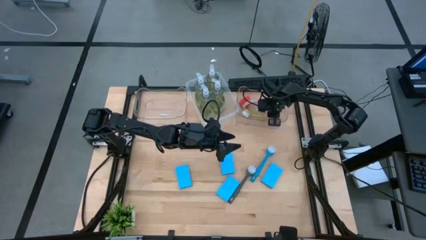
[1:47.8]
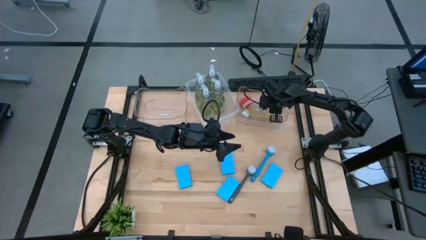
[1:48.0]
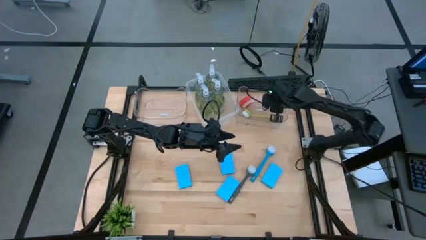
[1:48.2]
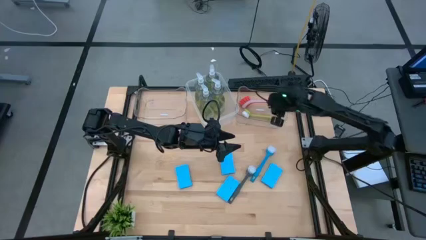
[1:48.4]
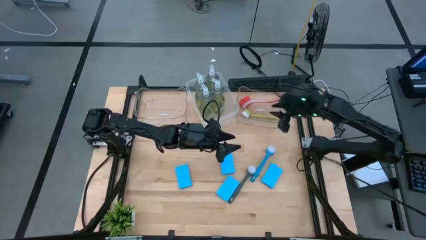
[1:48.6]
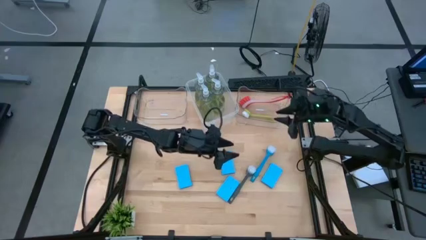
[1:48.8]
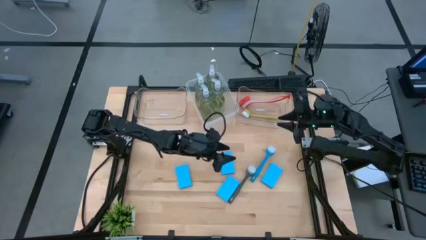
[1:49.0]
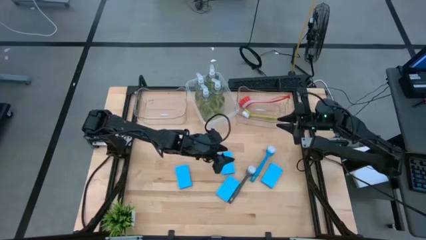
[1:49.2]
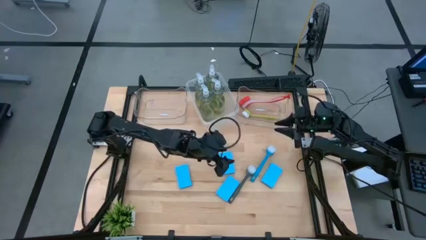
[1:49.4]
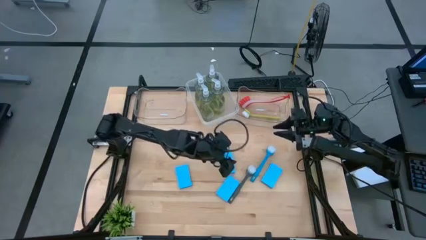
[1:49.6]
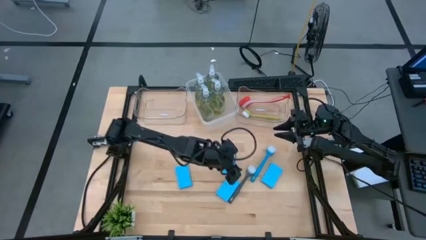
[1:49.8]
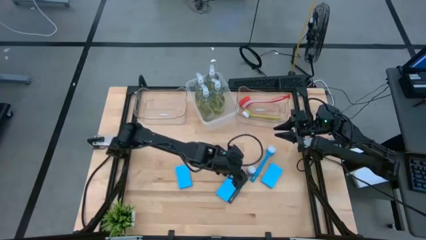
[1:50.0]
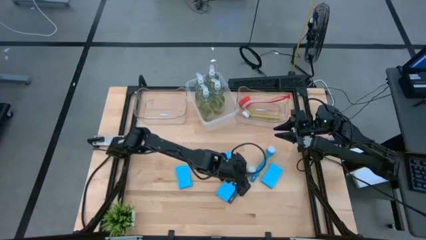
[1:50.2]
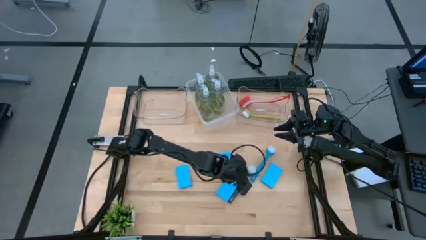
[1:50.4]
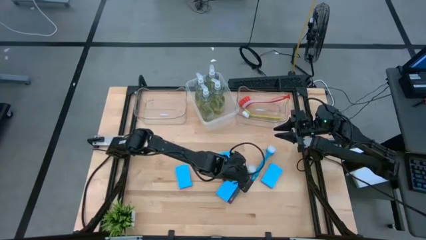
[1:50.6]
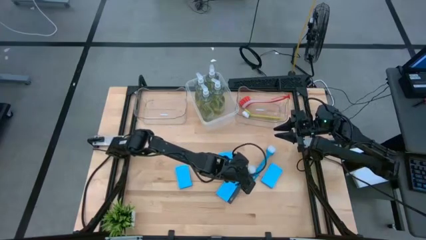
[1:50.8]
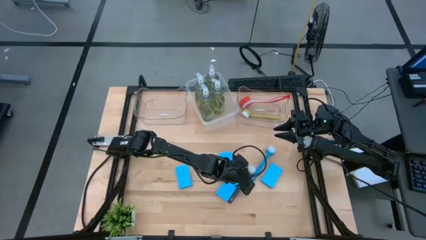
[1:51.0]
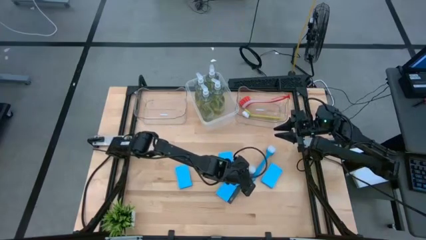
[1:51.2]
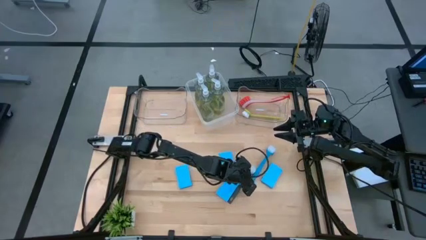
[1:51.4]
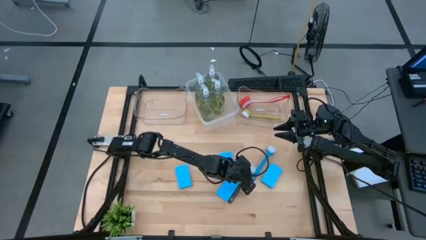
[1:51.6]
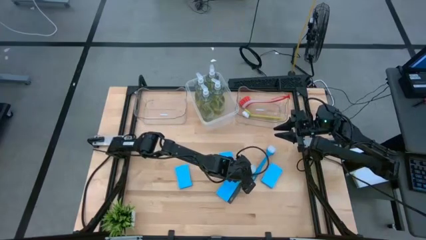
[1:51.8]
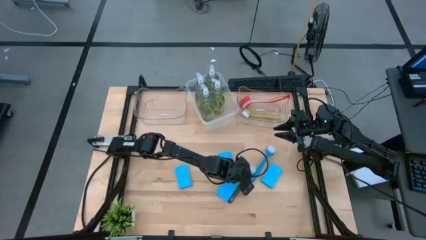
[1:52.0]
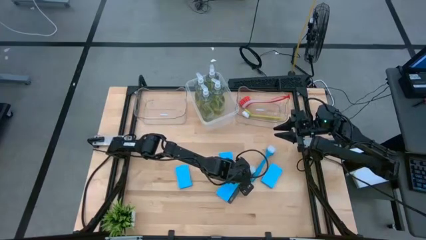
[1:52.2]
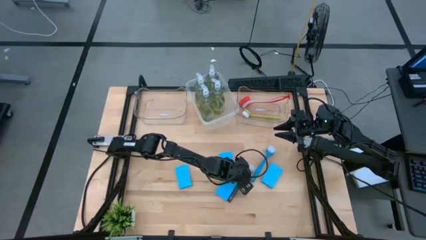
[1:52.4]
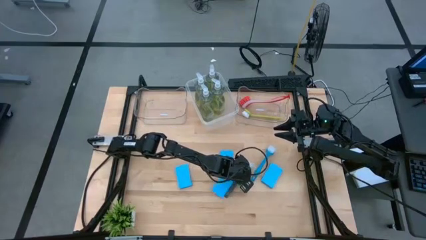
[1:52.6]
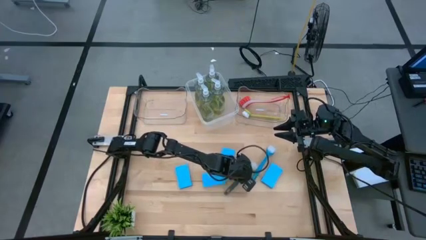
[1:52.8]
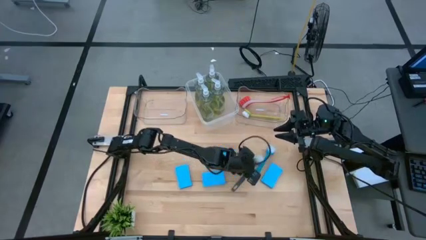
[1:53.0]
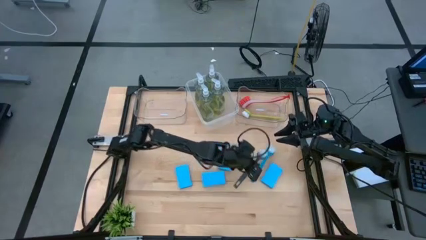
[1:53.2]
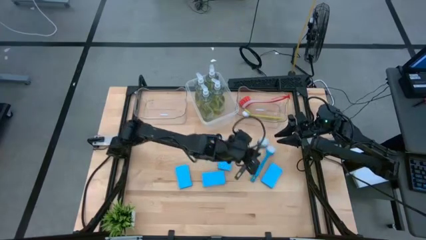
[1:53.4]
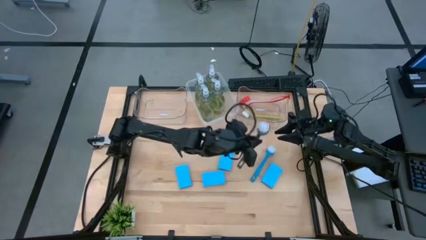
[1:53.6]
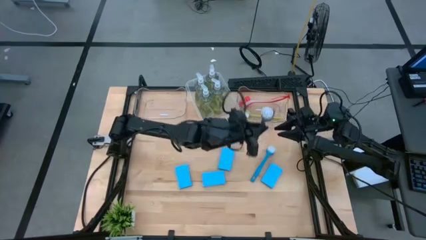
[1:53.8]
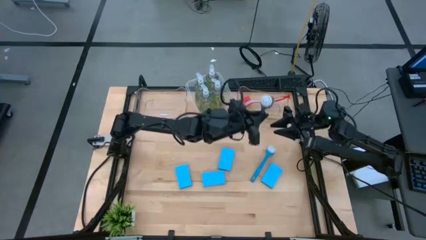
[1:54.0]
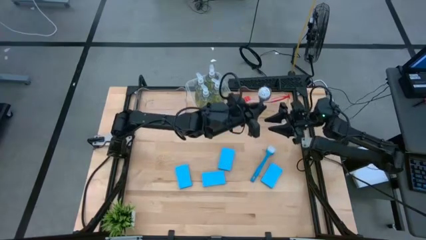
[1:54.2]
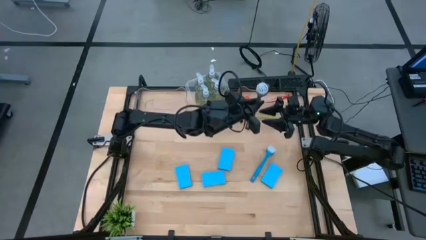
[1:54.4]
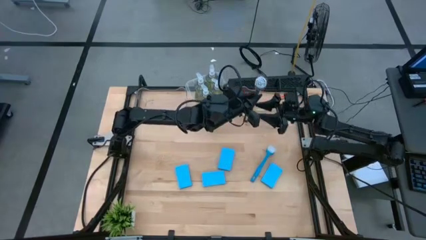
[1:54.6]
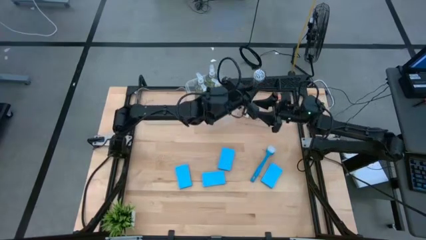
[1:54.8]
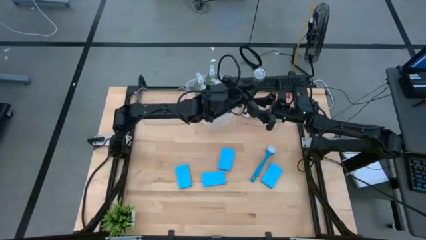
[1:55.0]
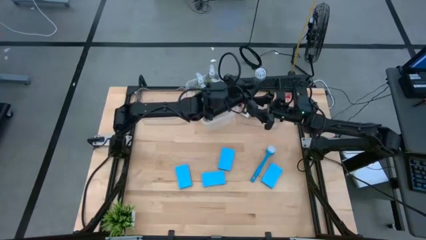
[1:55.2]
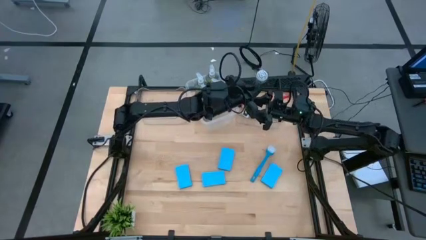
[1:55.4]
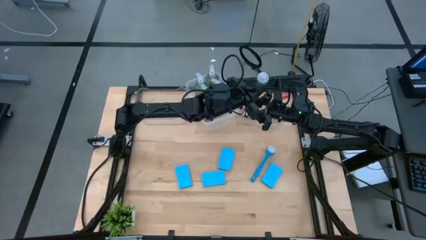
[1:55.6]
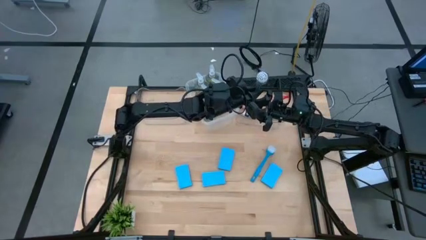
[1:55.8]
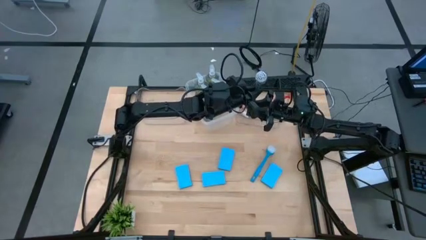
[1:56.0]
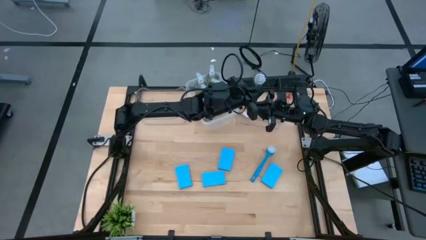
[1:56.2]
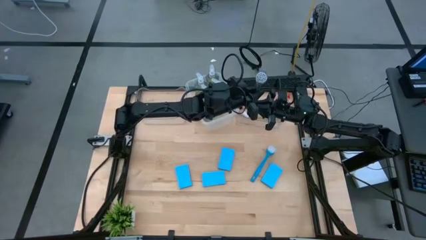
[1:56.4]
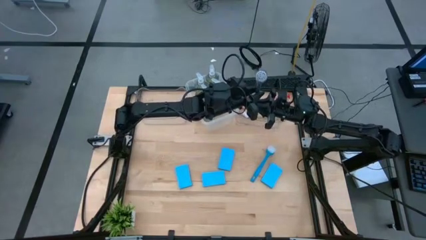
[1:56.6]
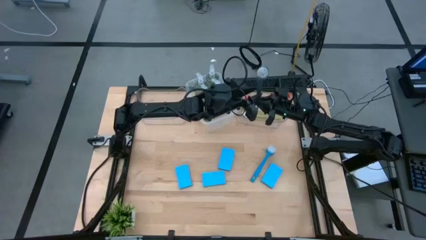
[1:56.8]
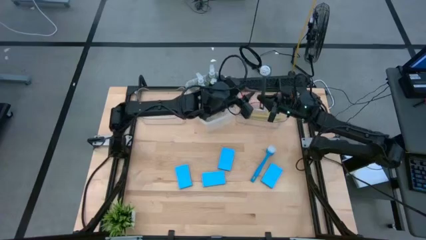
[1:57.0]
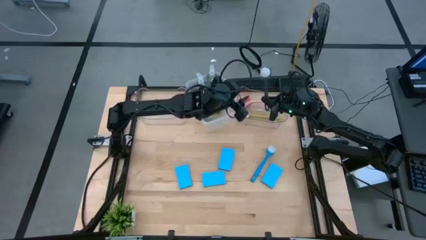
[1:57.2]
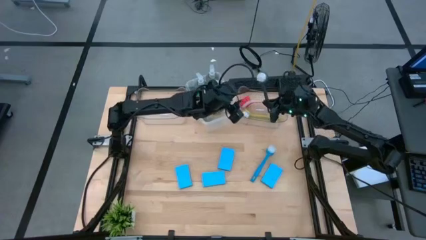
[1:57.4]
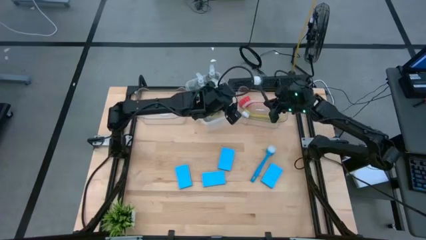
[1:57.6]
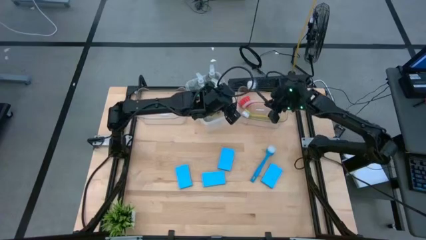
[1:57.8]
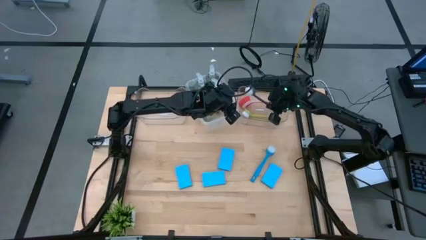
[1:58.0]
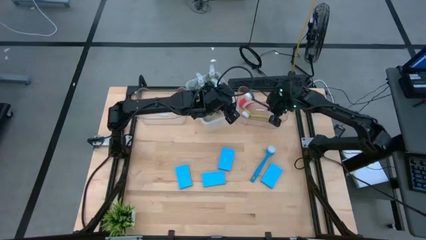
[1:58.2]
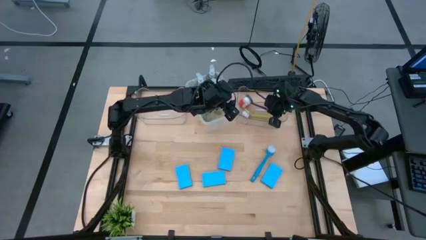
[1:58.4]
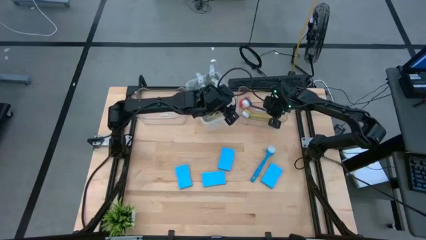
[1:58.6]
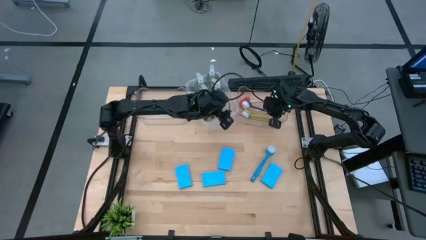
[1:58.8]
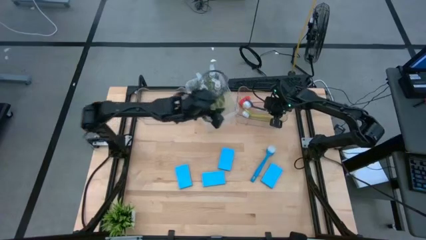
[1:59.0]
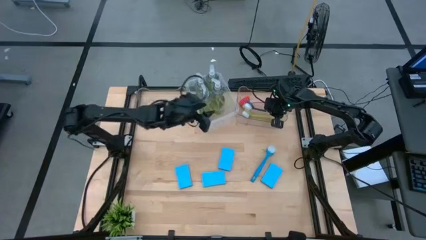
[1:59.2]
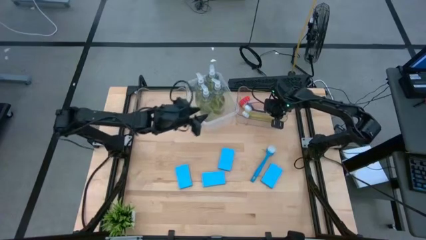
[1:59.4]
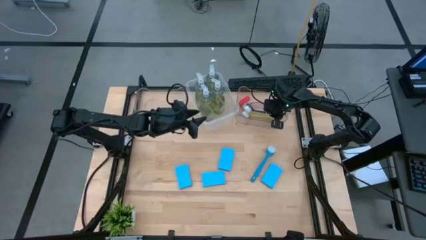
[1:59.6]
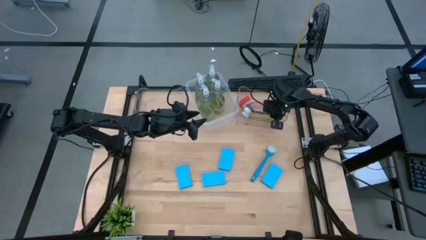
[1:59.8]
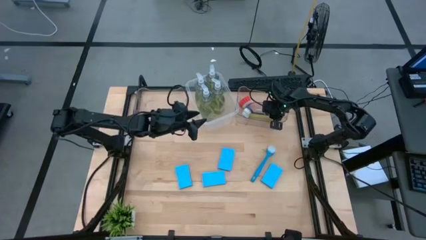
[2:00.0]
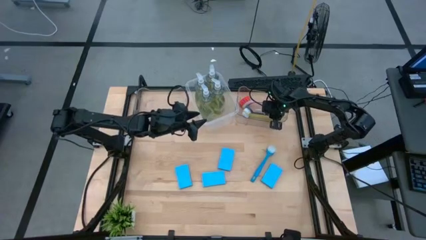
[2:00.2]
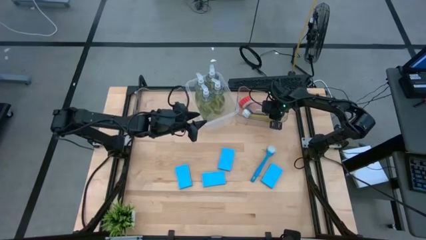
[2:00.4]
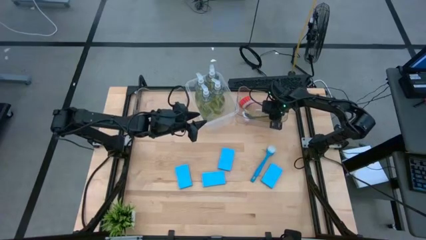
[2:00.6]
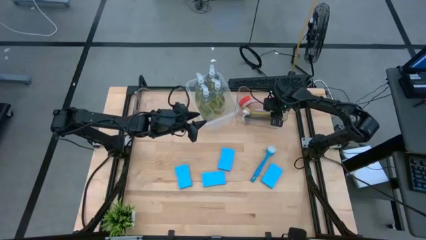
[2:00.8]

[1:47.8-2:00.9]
Task: Pick & Place Kitchen Sink Supplies
Put the gray toilet brush into the right transparent bin
